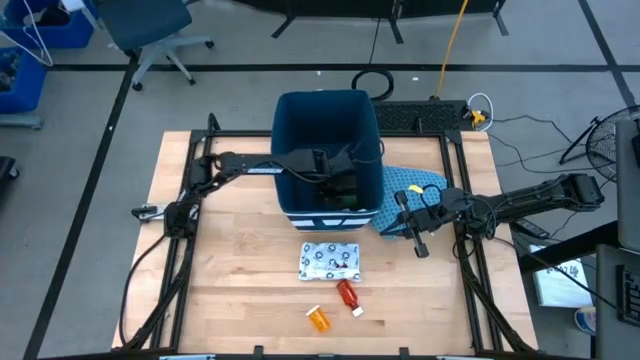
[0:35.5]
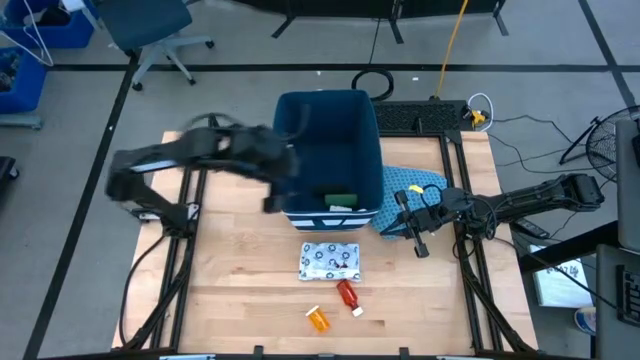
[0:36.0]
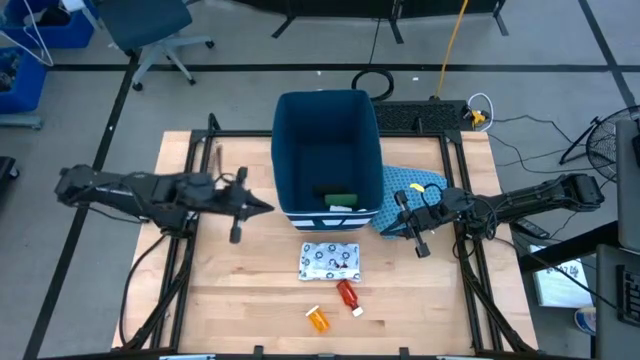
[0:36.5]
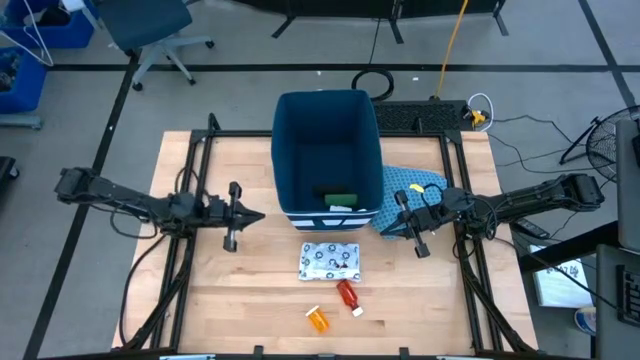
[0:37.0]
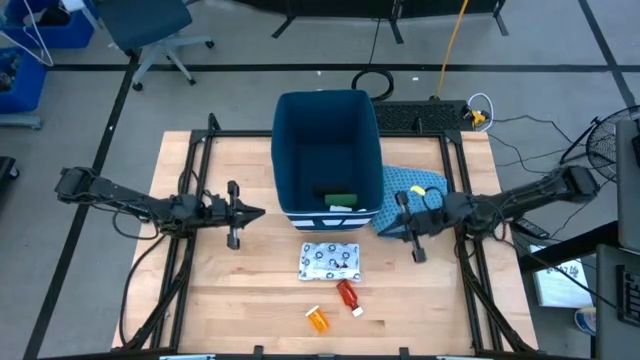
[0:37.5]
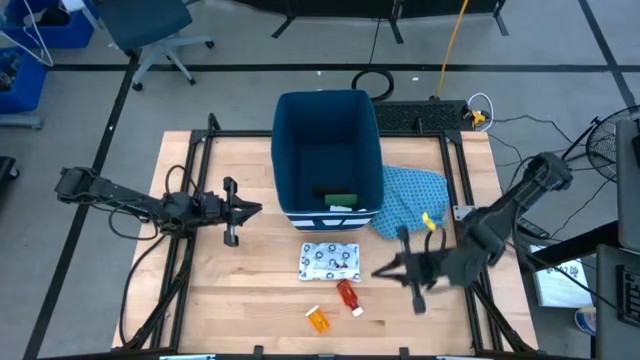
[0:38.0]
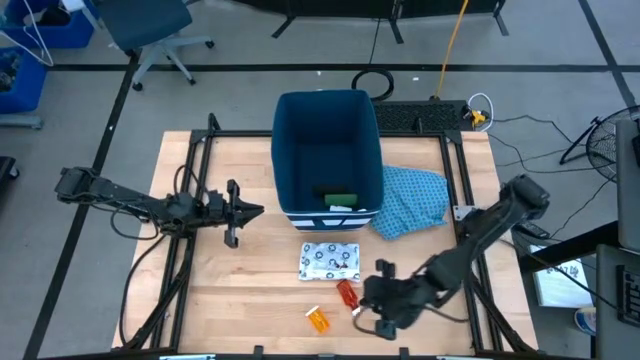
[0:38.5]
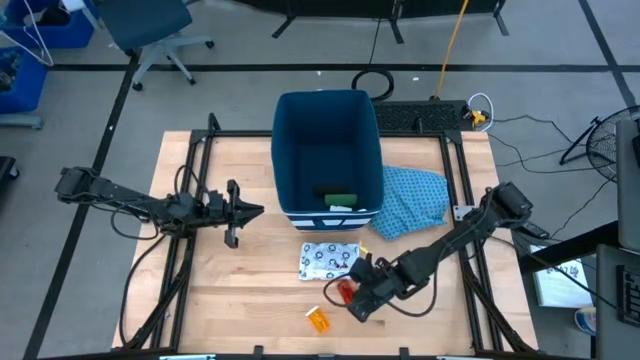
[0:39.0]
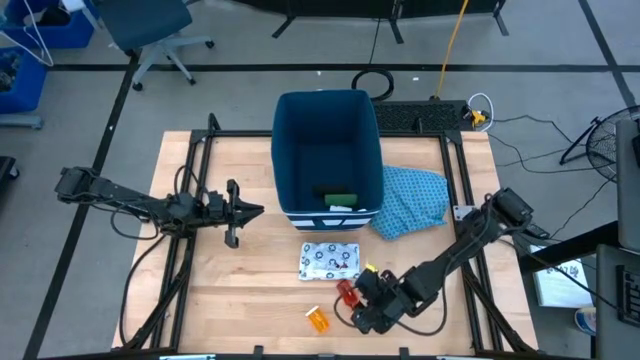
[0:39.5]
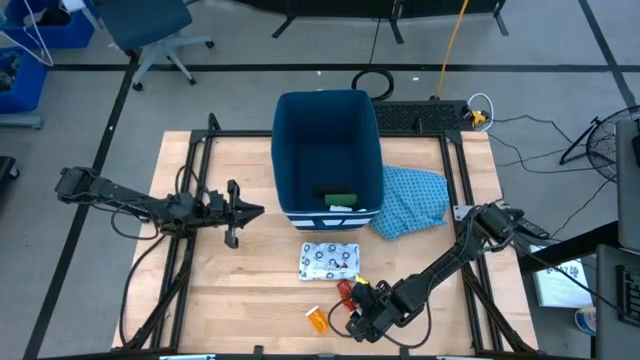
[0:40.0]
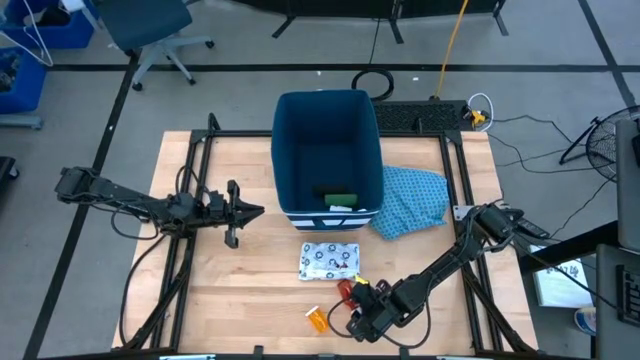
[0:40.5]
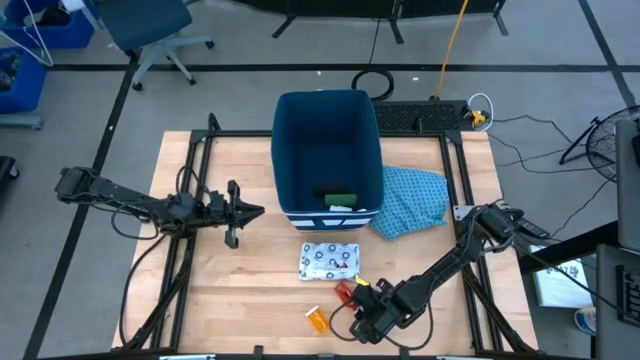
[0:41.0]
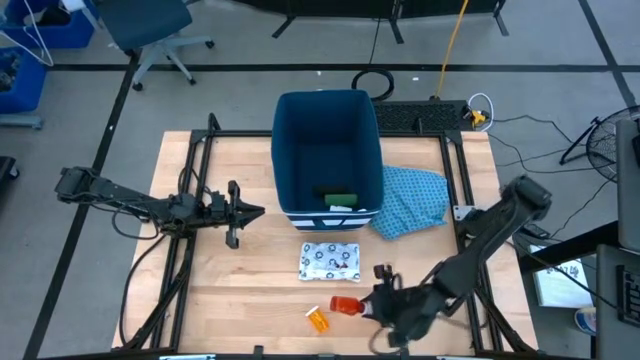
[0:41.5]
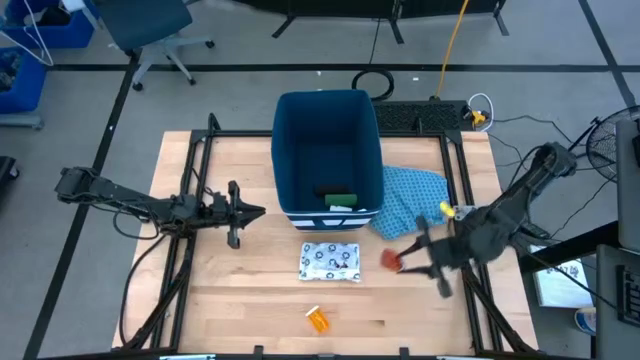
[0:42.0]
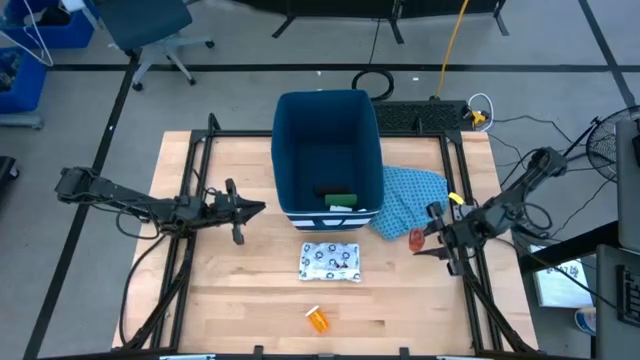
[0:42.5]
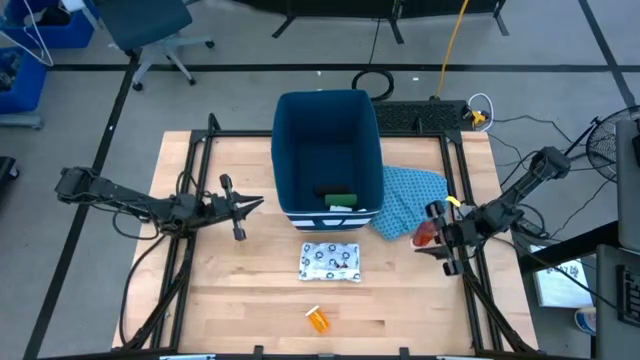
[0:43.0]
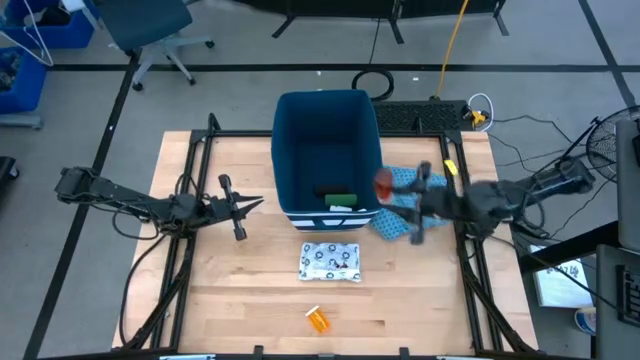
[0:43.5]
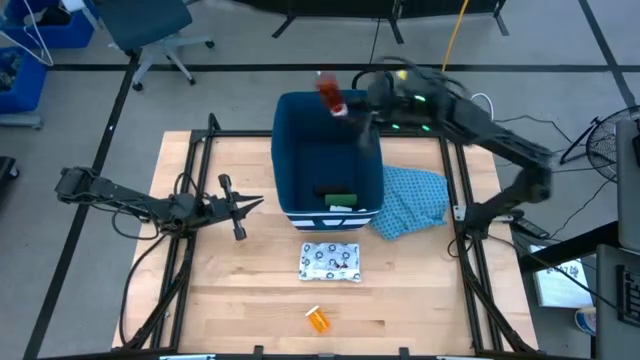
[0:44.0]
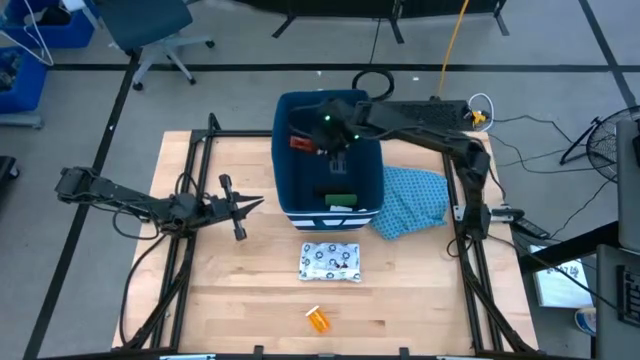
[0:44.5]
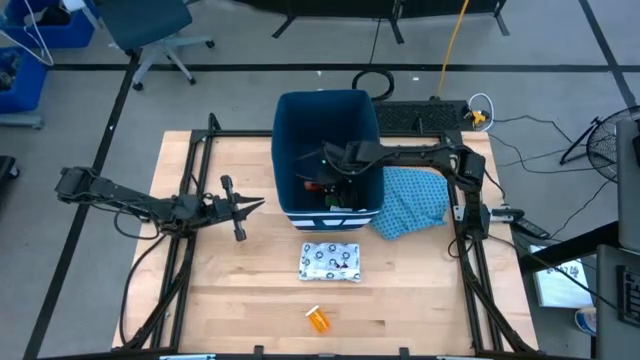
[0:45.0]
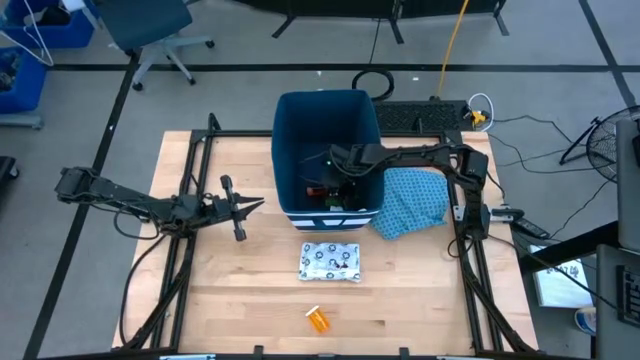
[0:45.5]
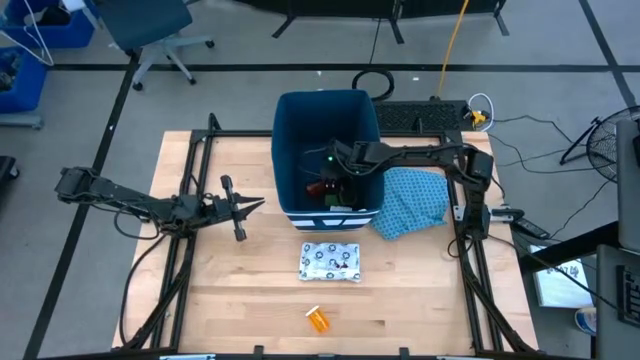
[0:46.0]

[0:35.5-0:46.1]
Task: Pick & place medical supplies in basket/bin
Put the red medicine bottle into the blue bin

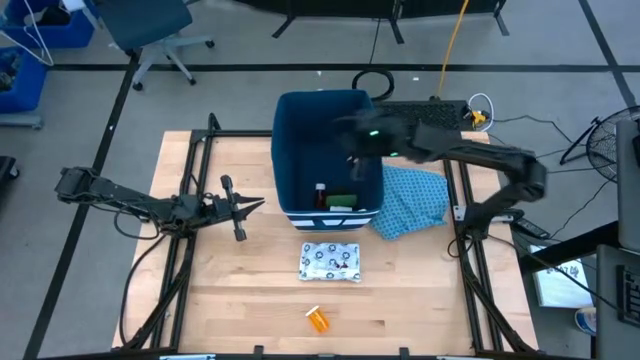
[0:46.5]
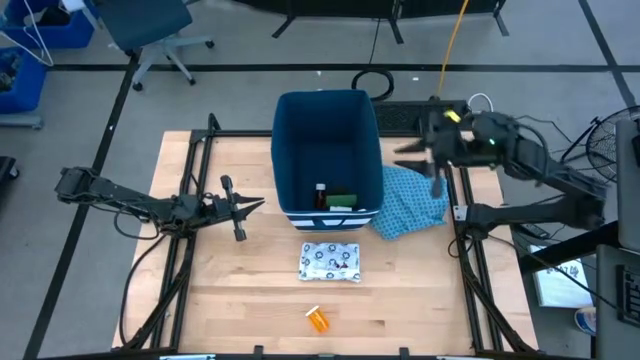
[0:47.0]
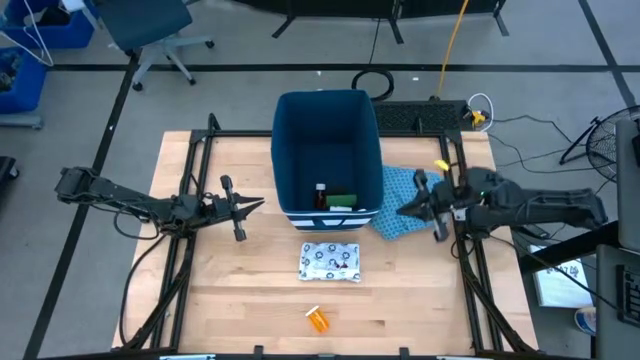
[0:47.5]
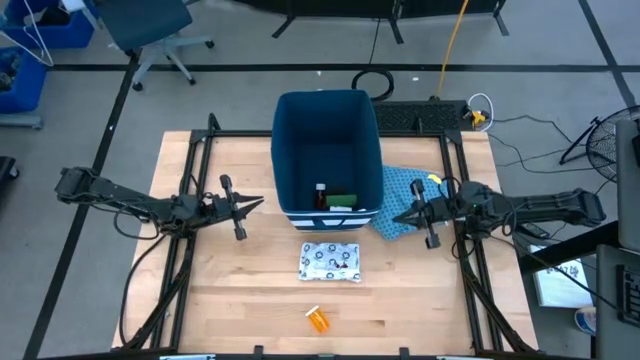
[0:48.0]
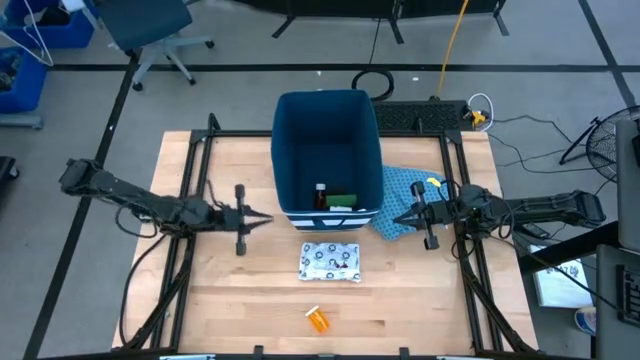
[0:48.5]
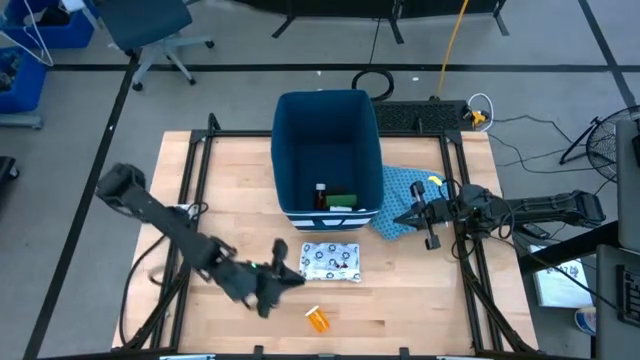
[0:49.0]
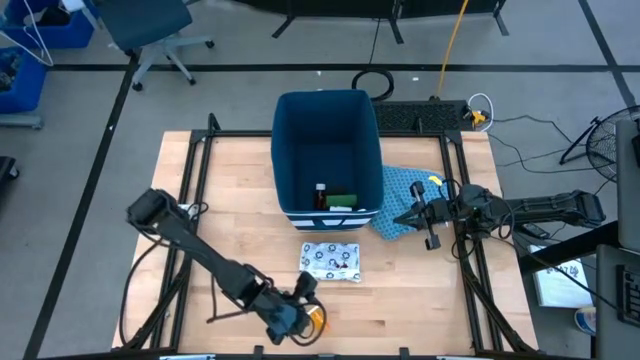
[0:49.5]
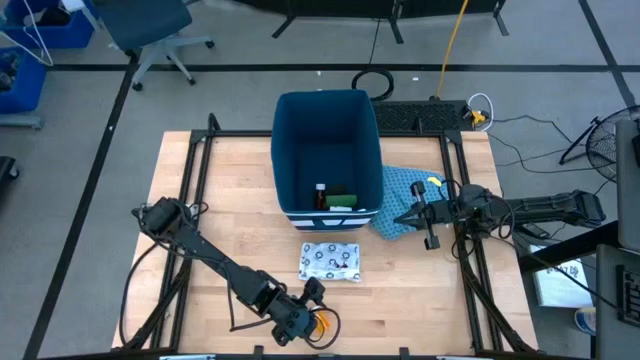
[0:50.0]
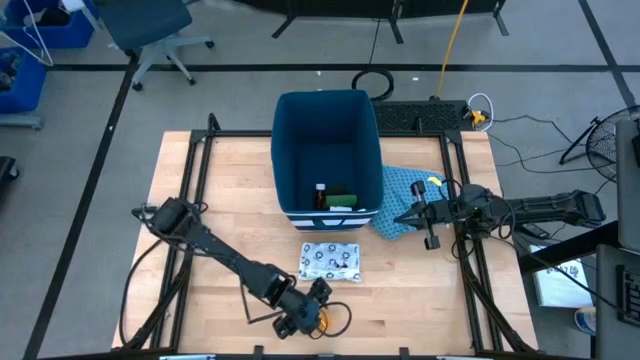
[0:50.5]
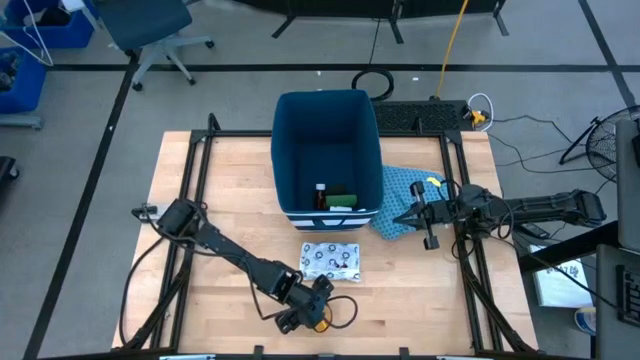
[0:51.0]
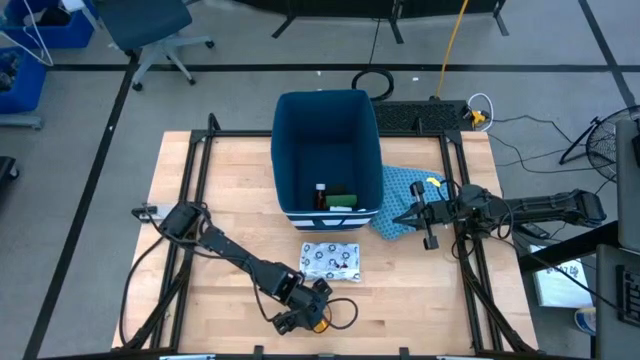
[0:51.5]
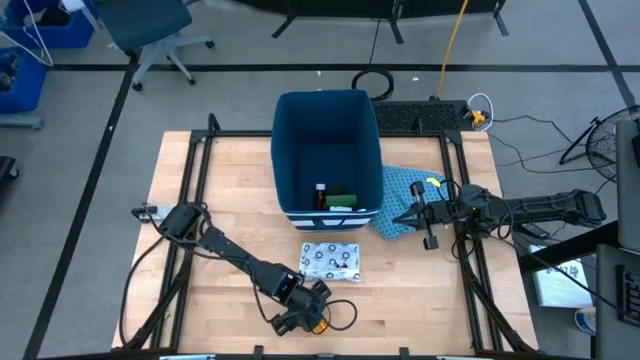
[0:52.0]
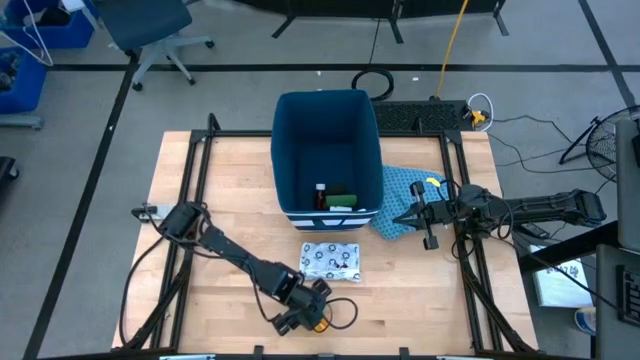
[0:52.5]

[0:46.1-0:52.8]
Put the orange medicine bottle into the blue bin

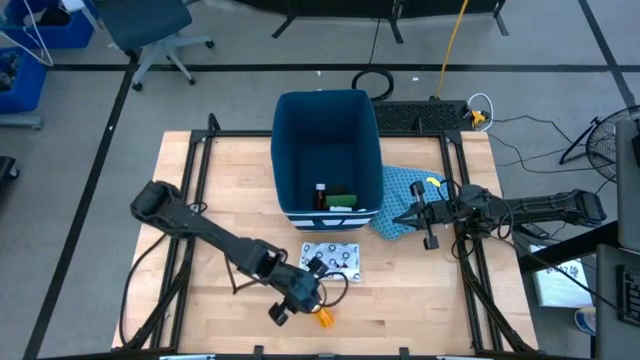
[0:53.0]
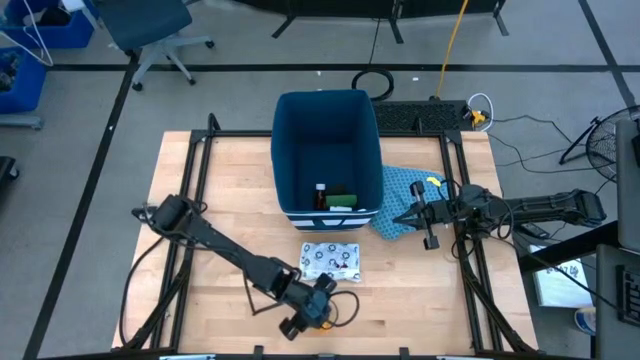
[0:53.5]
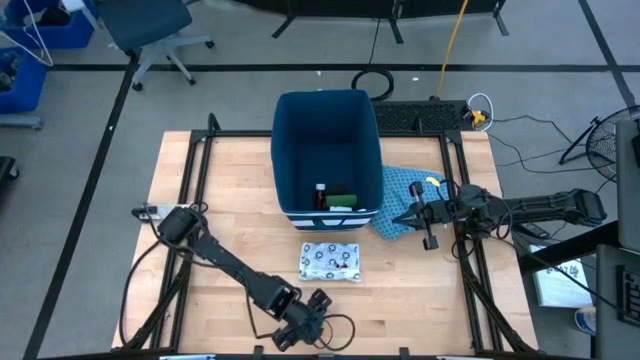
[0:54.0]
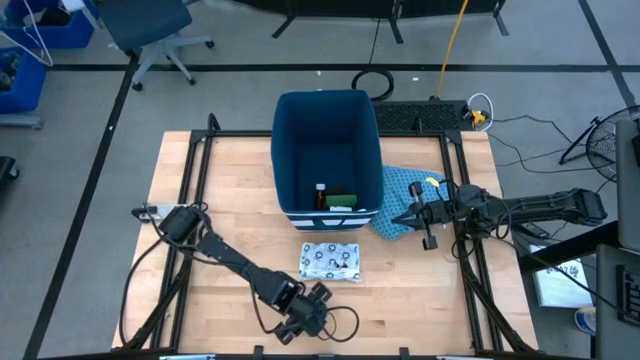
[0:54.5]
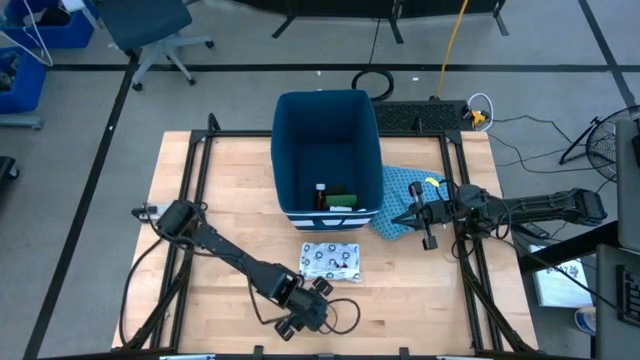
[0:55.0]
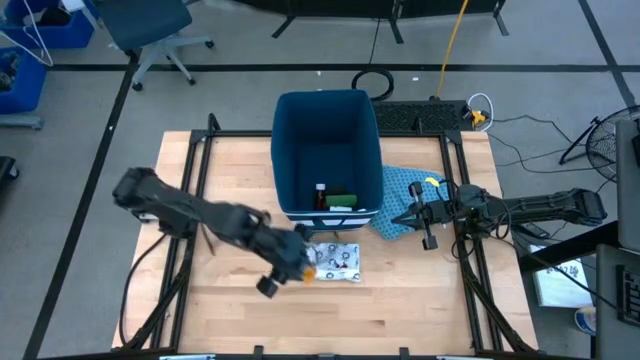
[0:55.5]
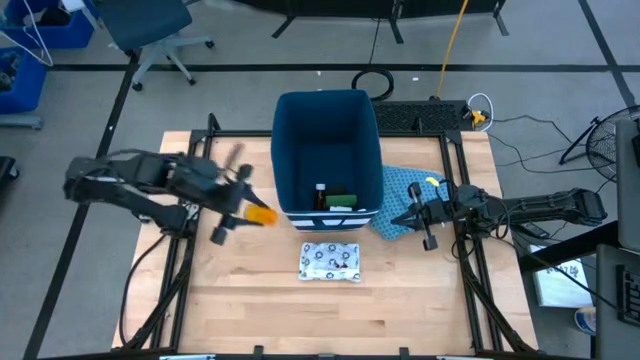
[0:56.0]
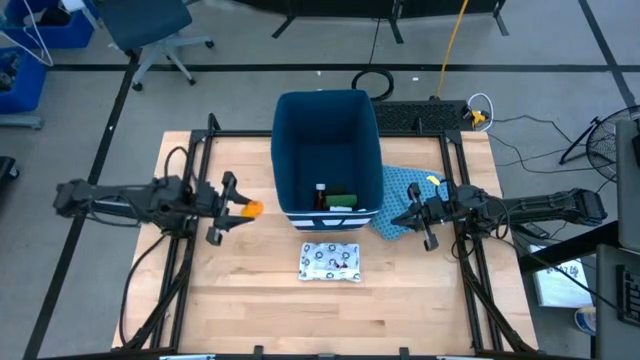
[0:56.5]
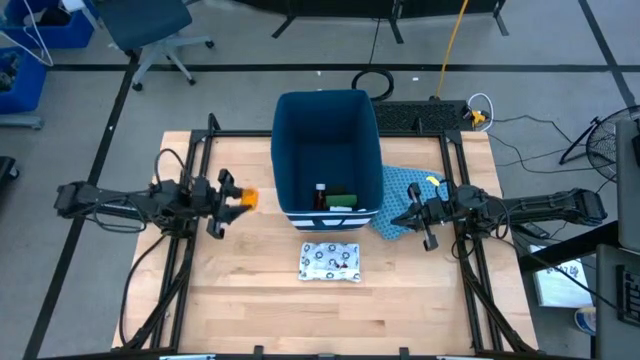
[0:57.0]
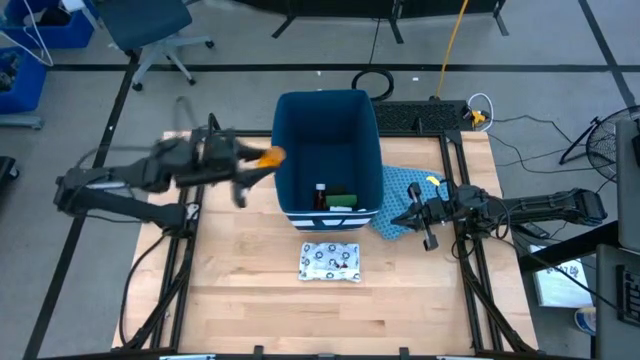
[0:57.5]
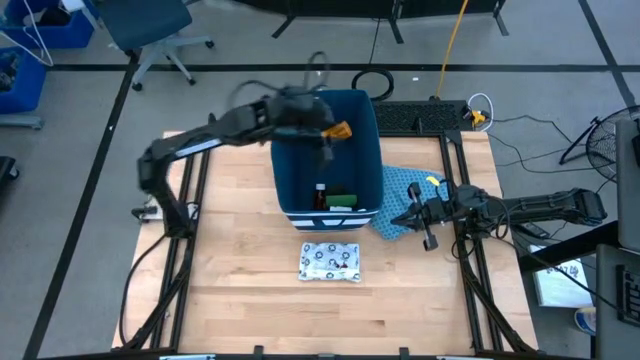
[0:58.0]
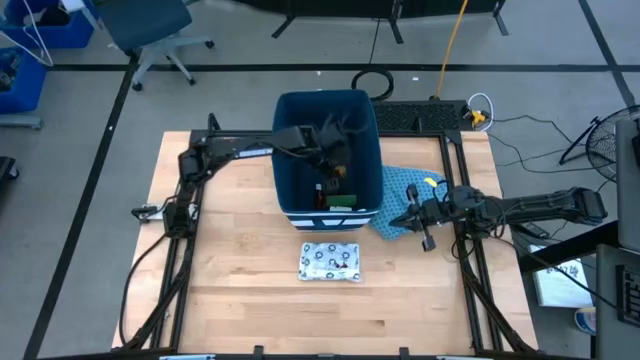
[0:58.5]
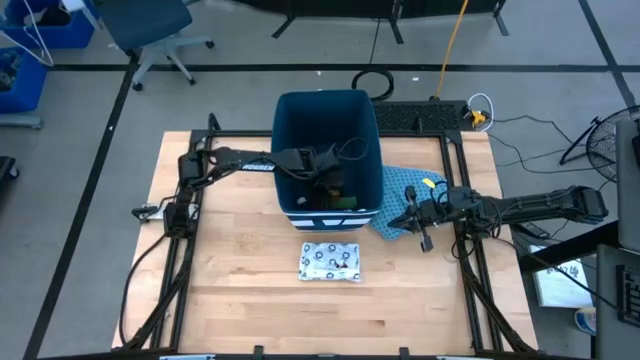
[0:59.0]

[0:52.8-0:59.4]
Put the orange medicine bottle into the blue bin
